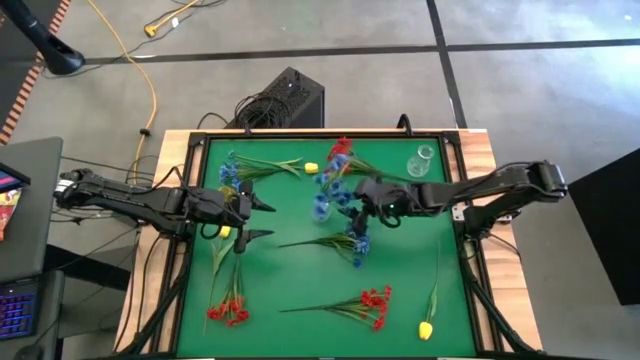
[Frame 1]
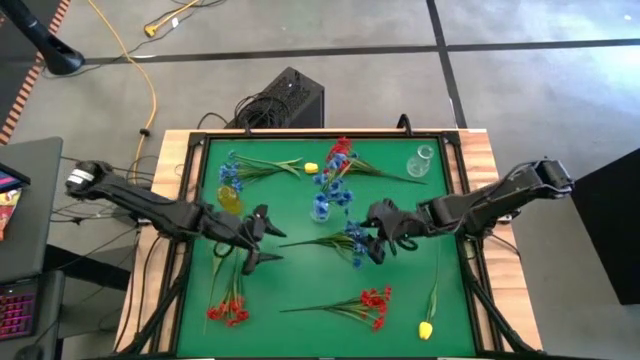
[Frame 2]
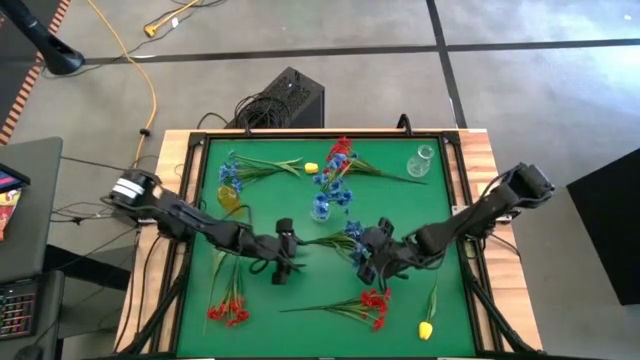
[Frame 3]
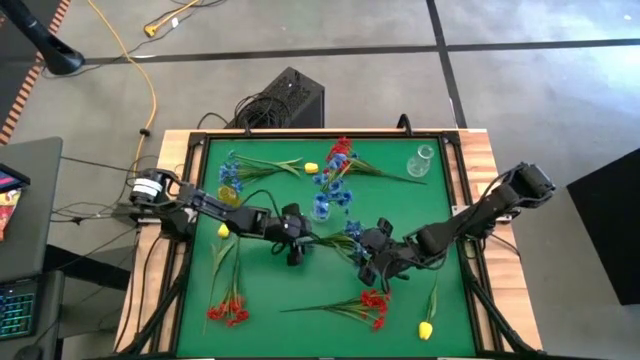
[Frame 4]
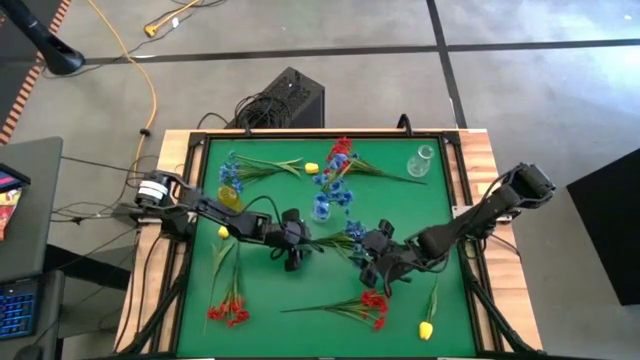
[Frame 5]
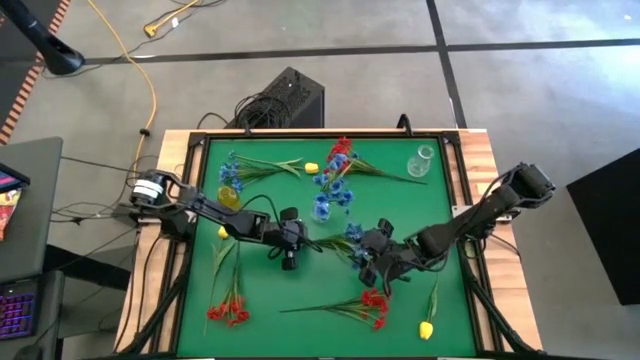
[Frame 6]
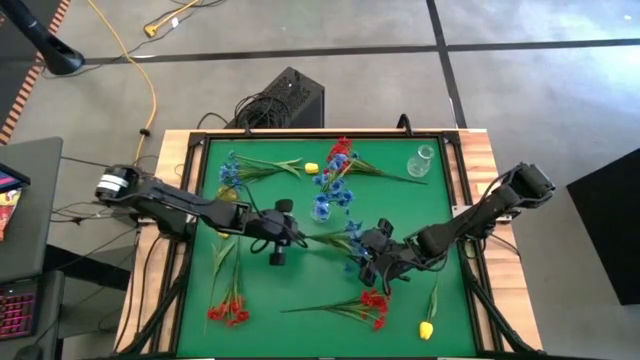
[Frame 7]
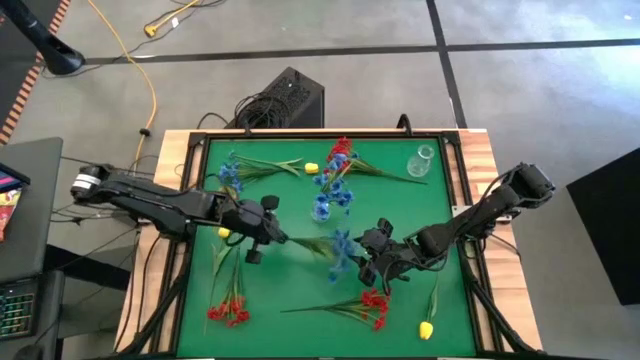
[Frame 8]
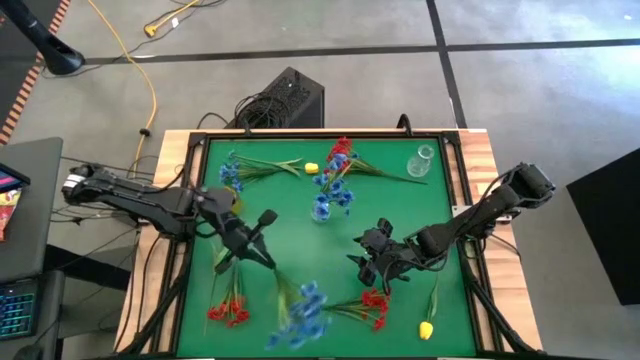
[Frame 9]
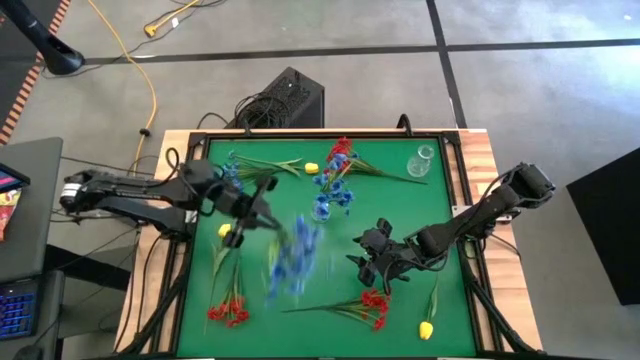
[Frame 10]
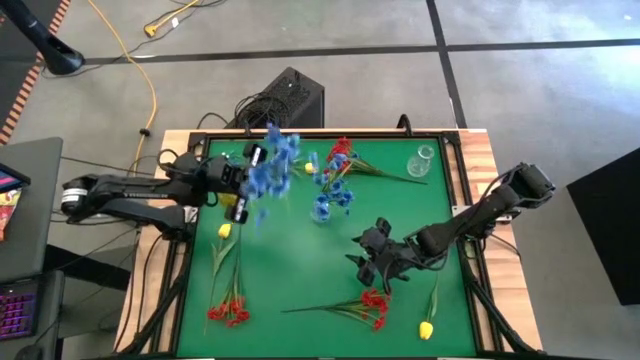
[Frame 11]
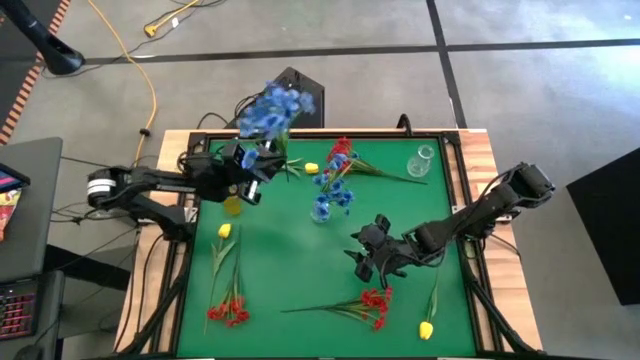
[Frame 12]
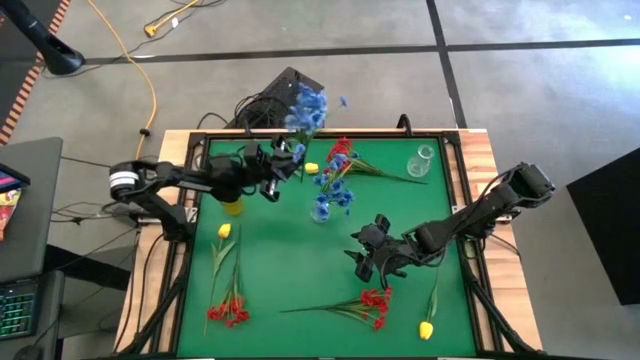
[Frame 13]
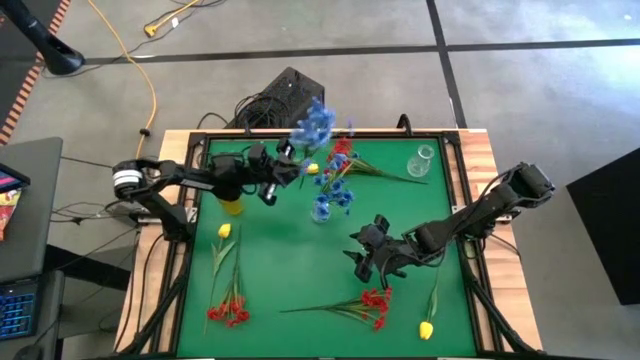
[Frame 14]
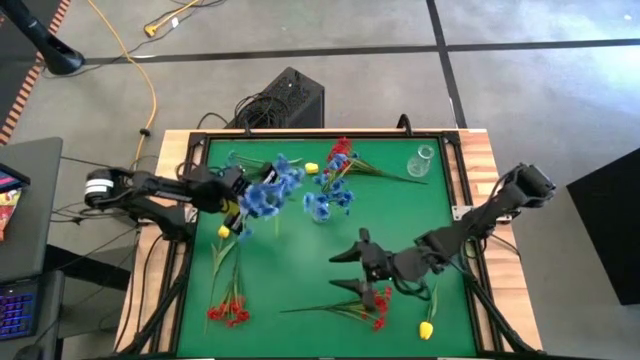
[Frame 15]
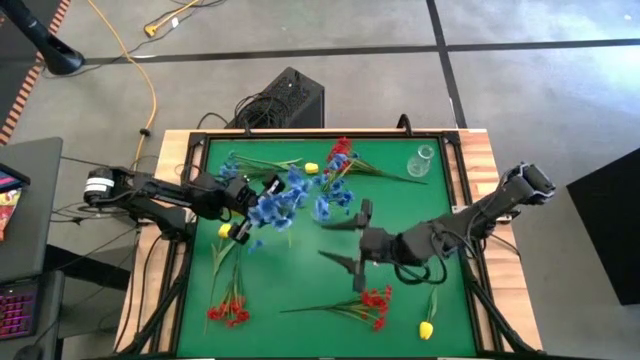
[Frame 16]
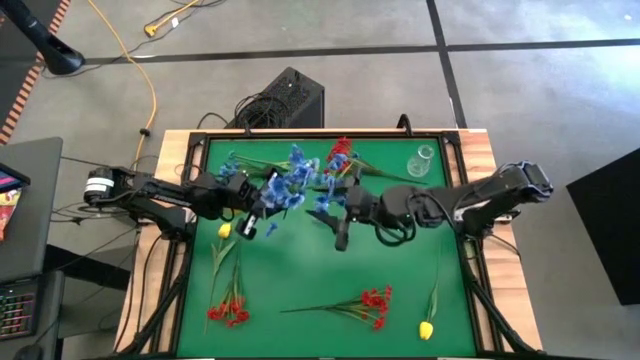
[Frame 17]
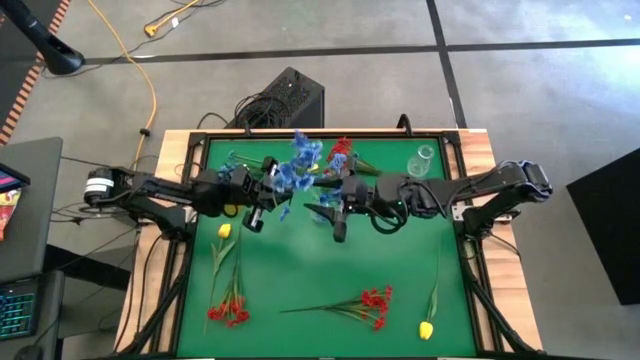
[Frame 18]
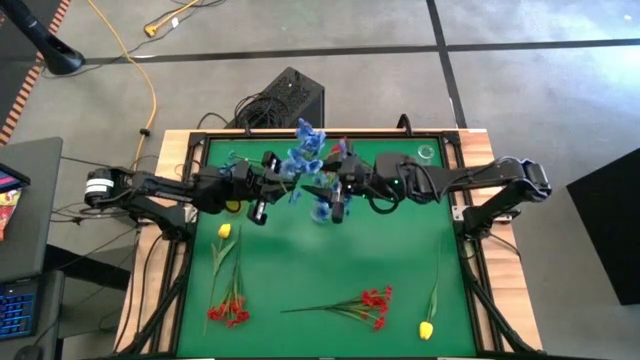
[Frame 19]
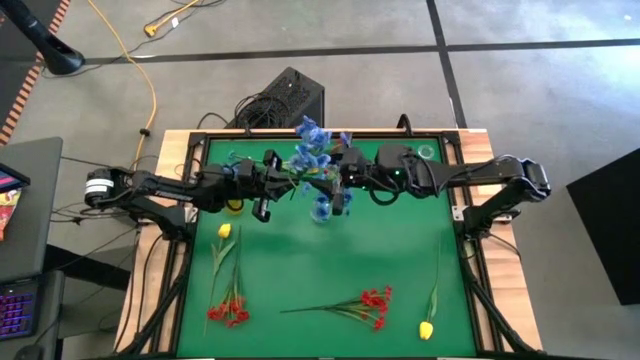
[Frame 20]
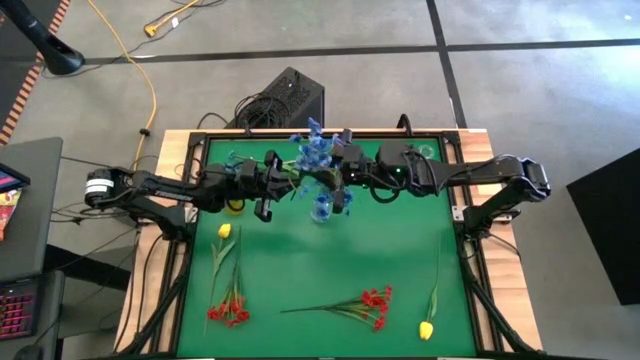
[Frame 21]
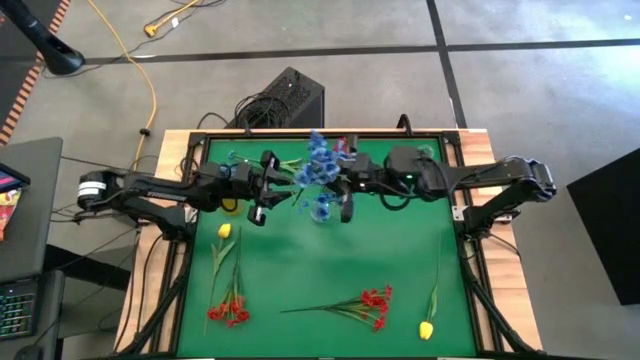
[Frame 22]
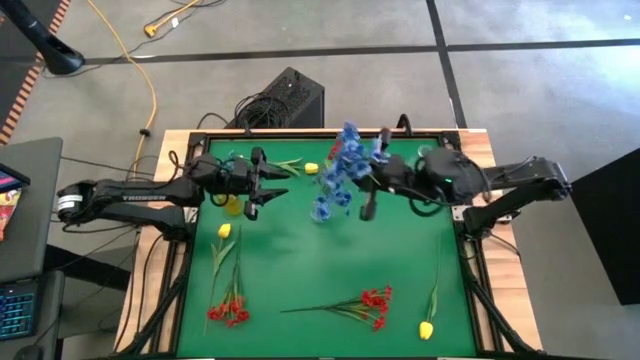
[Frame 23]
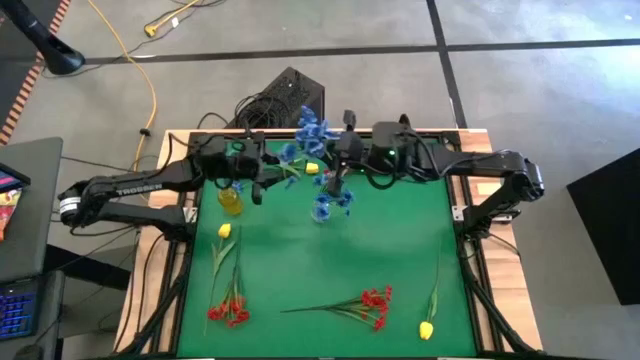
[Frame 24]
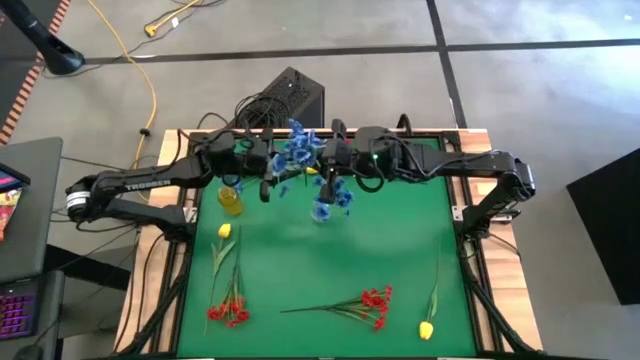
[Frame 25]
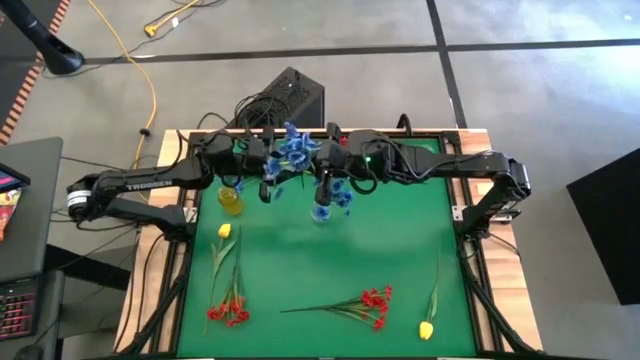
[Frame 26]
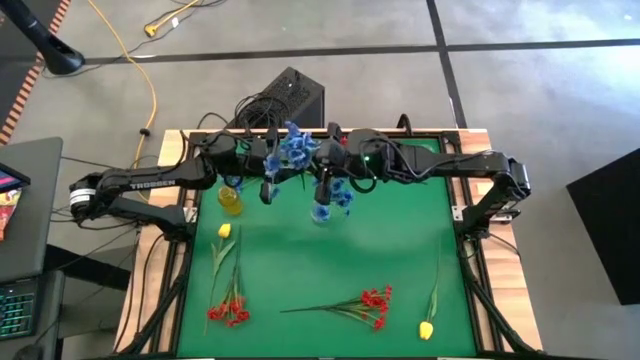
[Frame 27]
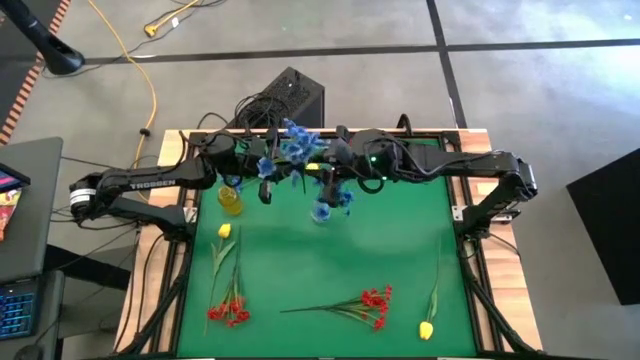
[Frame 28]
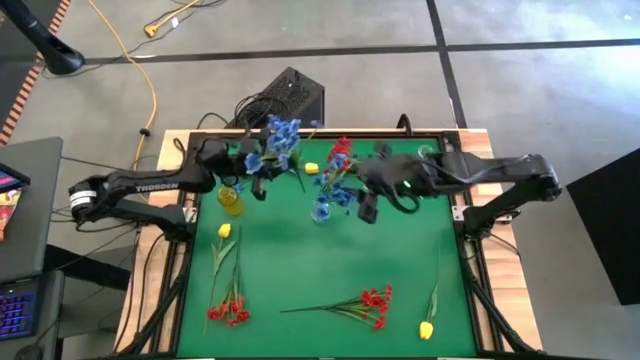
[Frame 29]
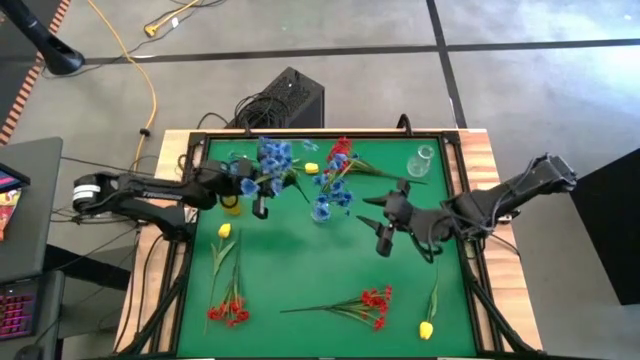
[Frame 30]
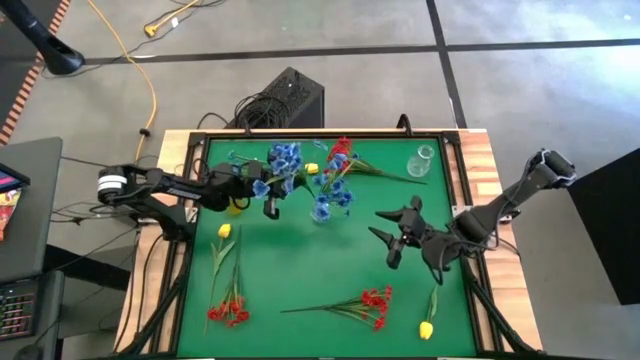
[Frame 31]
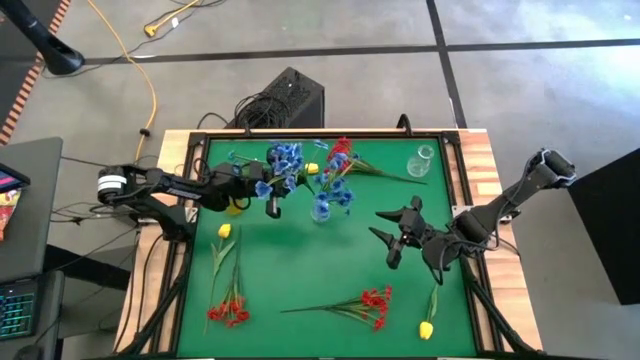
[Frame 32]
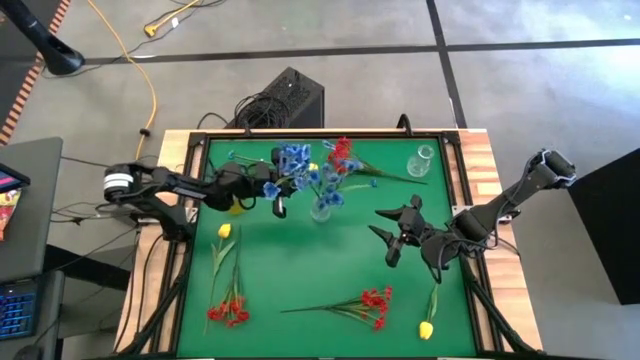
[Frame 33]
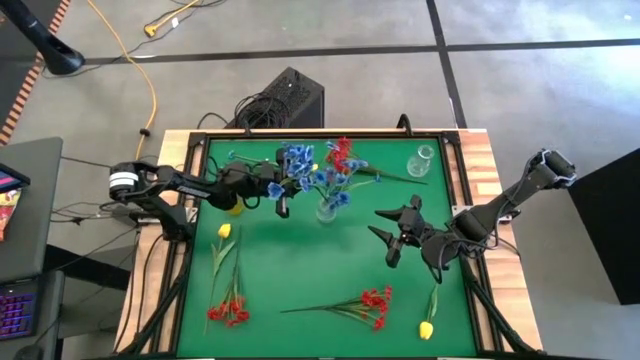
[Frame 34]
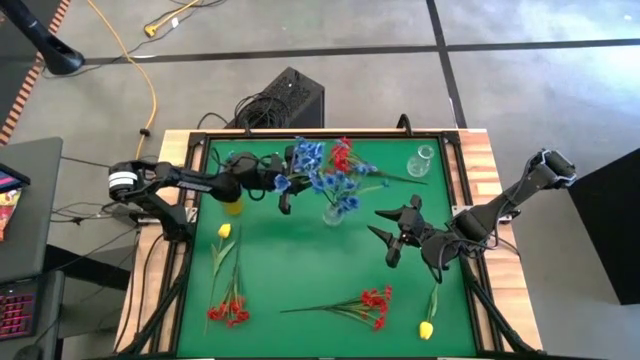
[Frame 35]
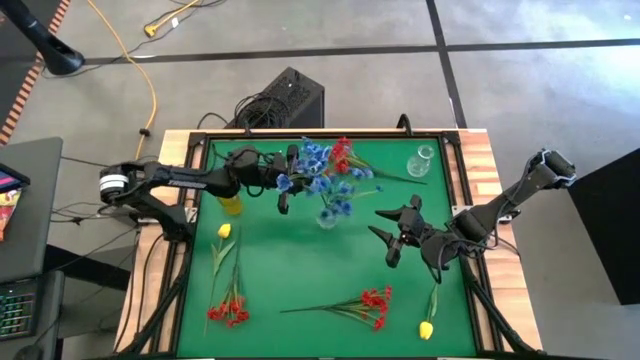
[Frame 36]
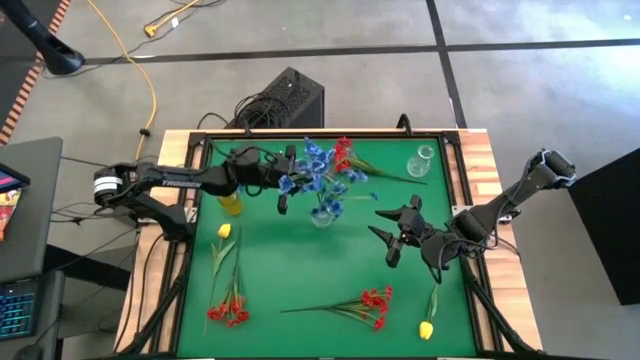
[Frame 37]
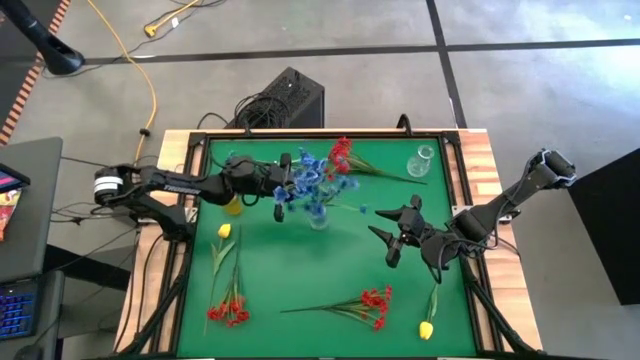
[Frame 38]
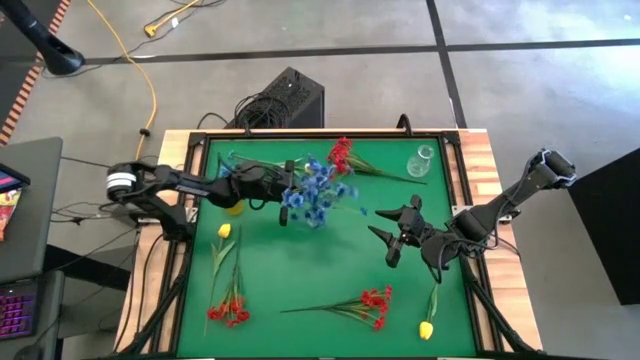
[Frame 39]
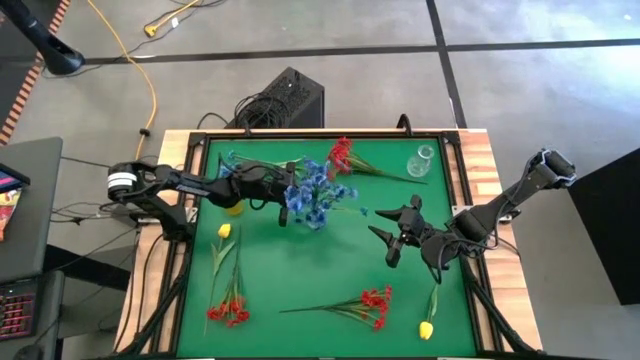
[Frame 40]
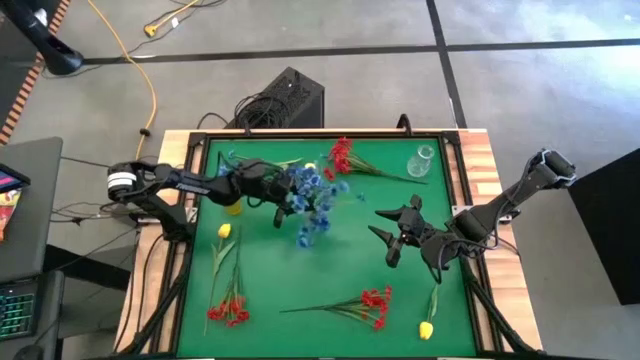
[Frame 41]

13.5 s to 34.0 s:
Task: Sort flowers into vase by color
Put the bottom blue flowers into the bottom transparent vase
